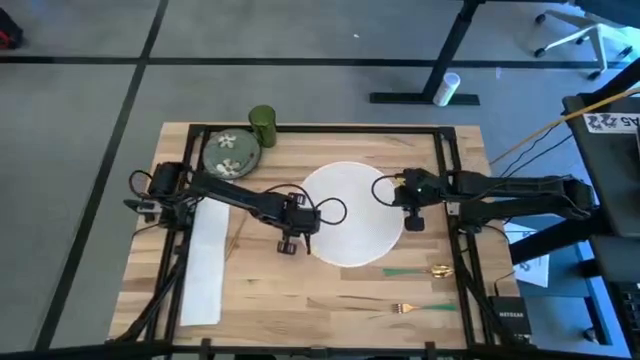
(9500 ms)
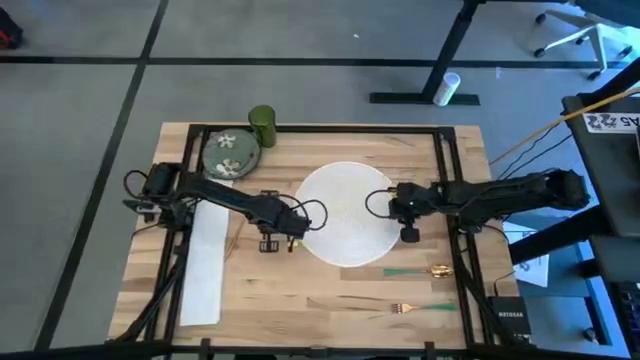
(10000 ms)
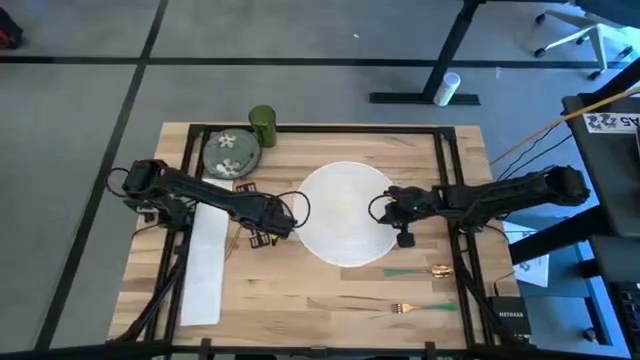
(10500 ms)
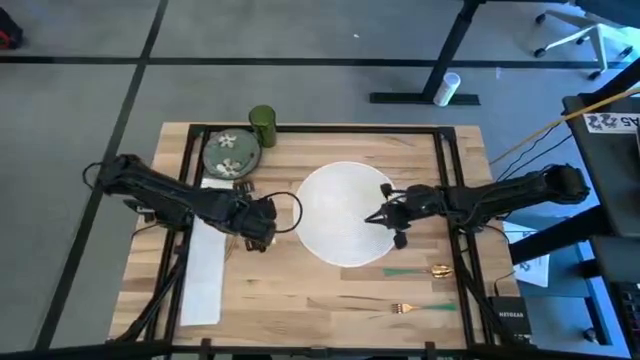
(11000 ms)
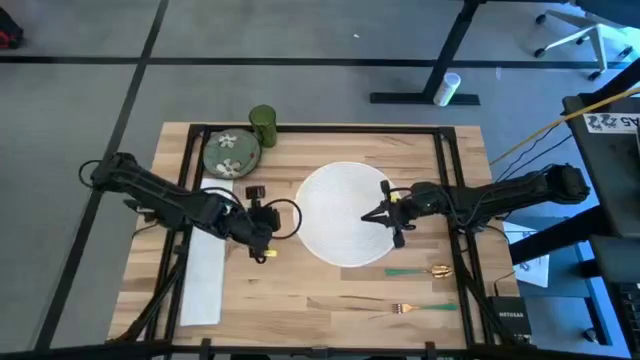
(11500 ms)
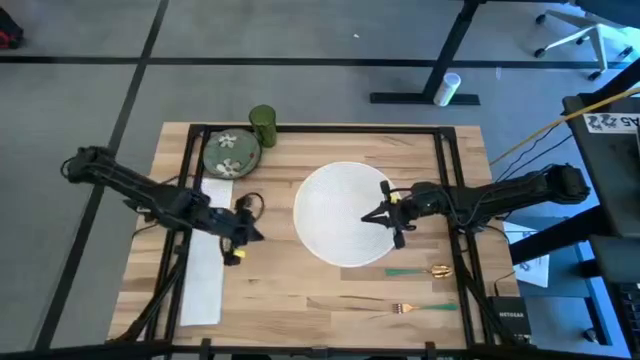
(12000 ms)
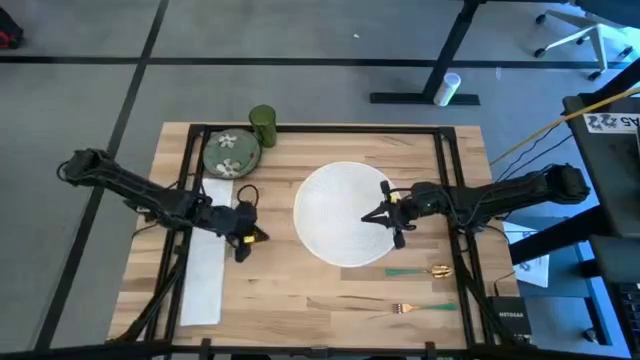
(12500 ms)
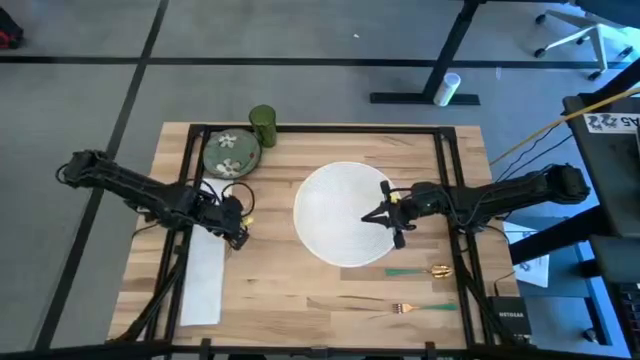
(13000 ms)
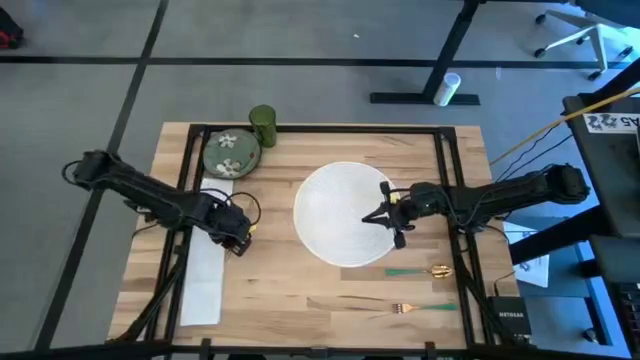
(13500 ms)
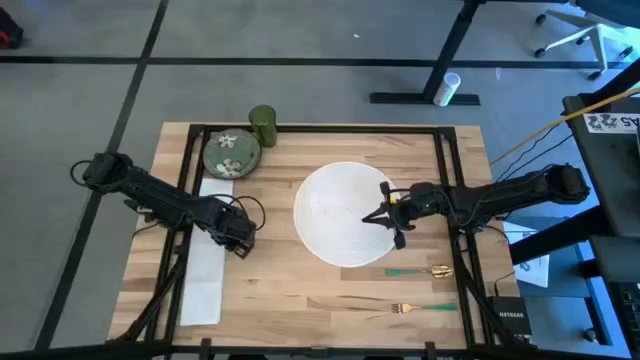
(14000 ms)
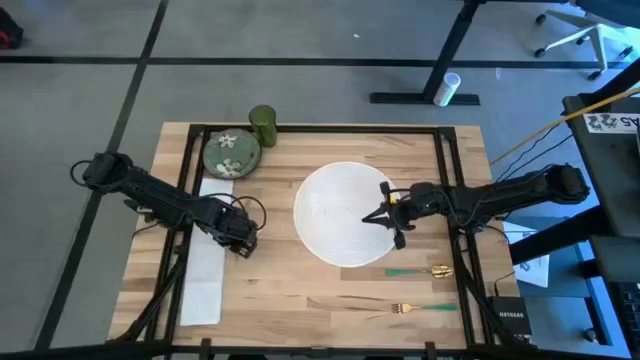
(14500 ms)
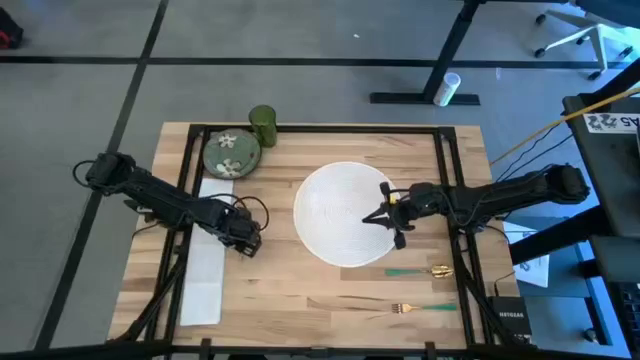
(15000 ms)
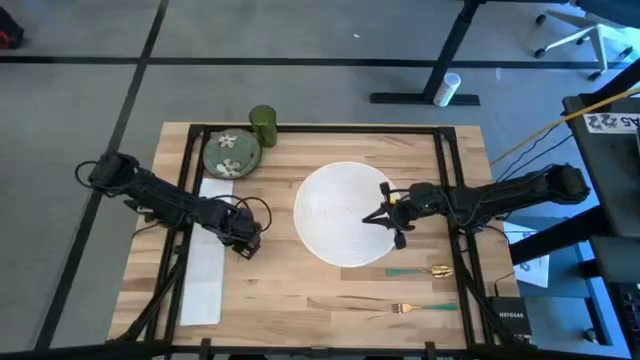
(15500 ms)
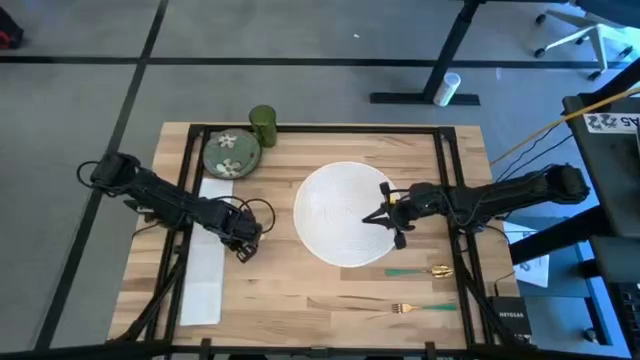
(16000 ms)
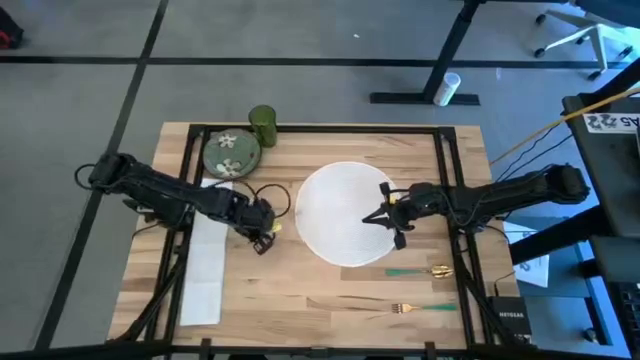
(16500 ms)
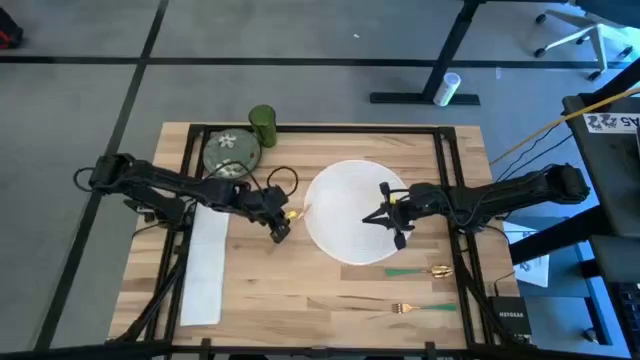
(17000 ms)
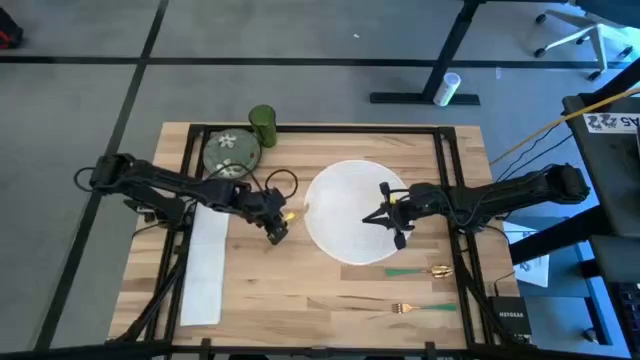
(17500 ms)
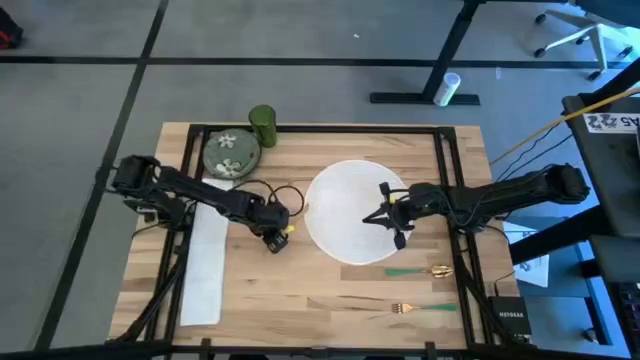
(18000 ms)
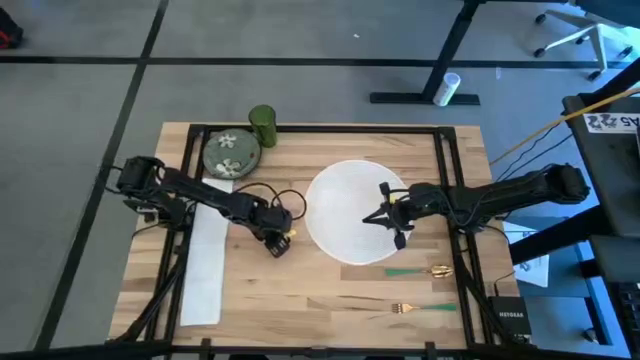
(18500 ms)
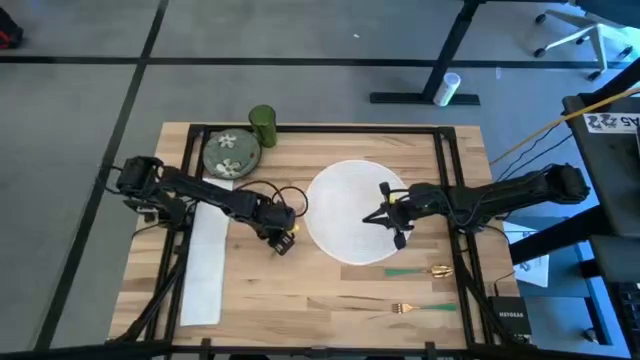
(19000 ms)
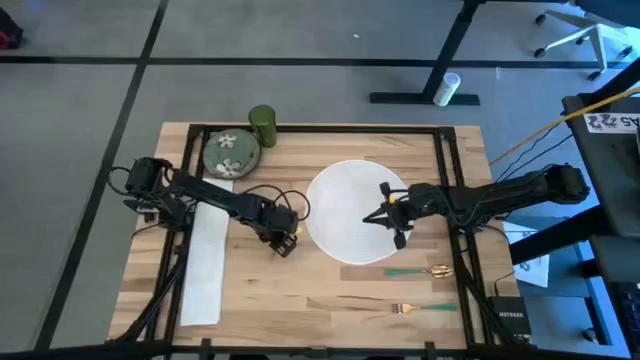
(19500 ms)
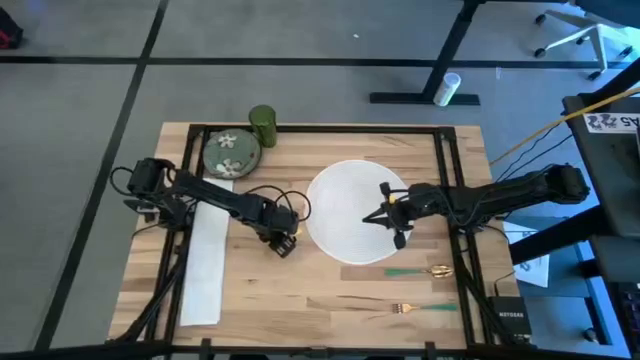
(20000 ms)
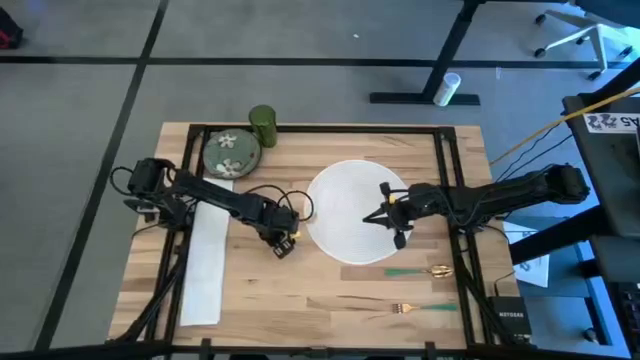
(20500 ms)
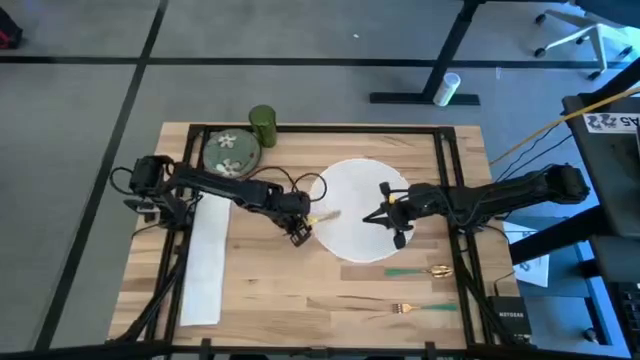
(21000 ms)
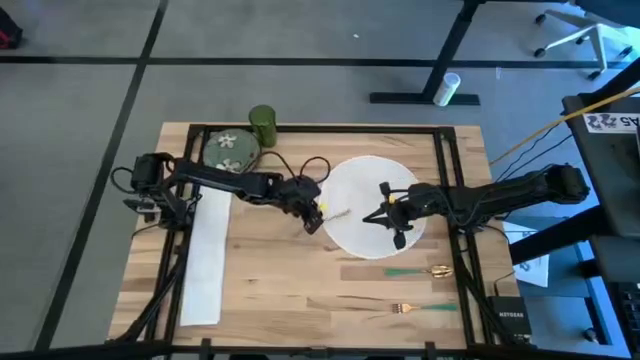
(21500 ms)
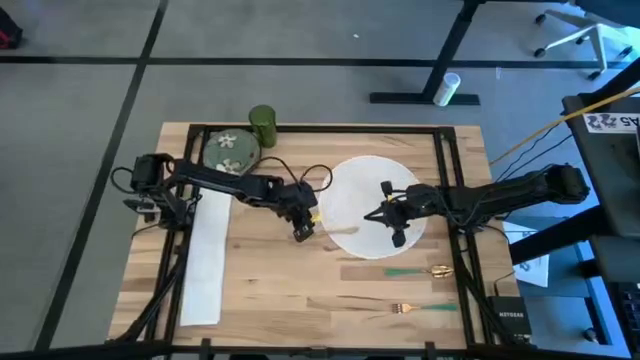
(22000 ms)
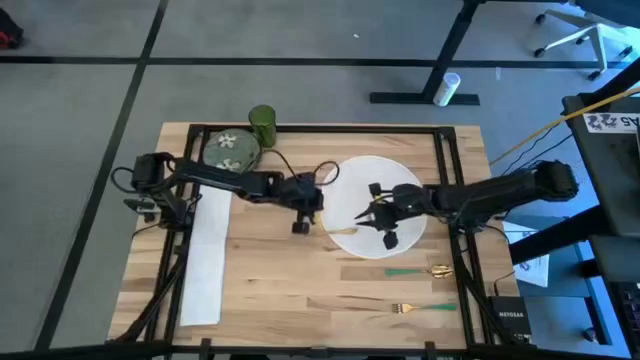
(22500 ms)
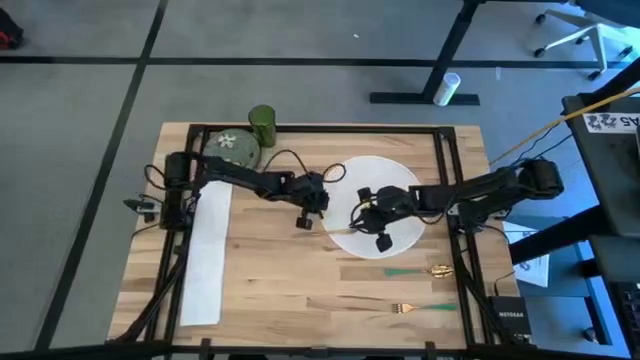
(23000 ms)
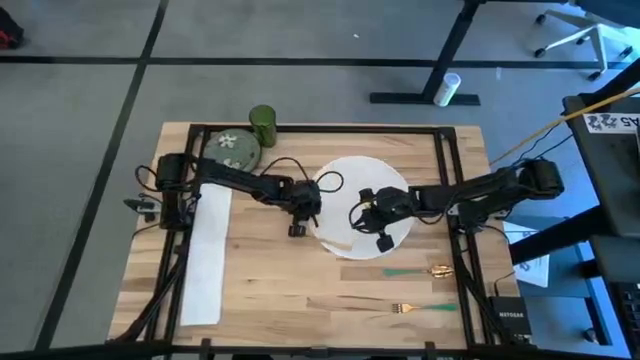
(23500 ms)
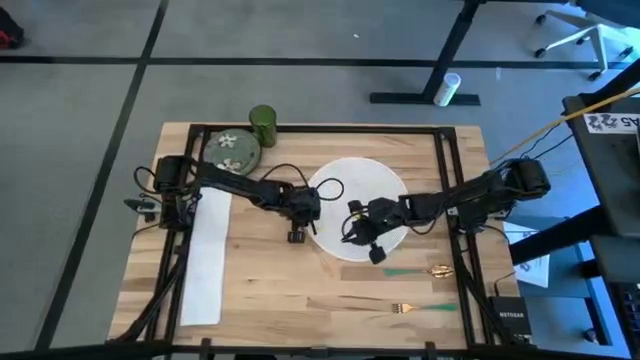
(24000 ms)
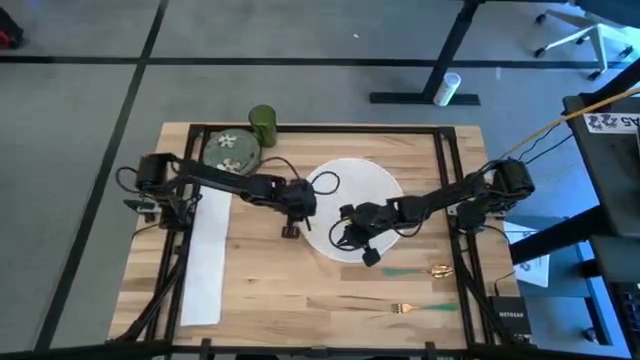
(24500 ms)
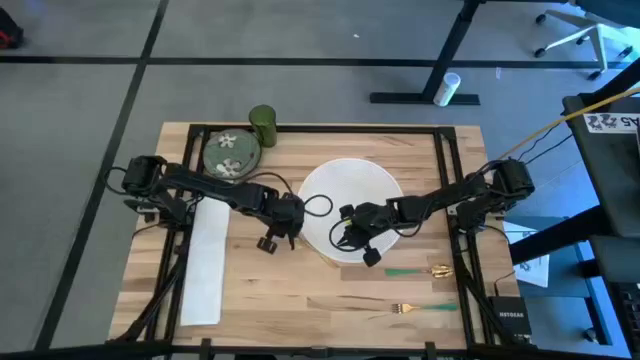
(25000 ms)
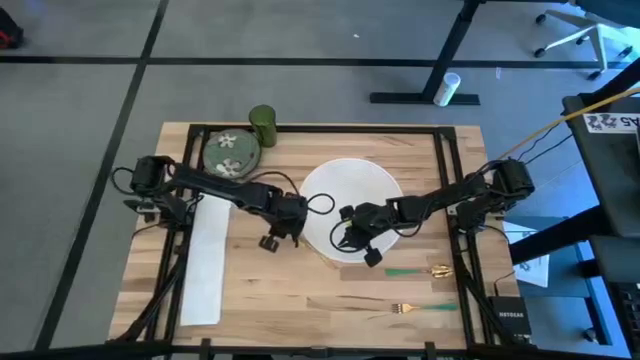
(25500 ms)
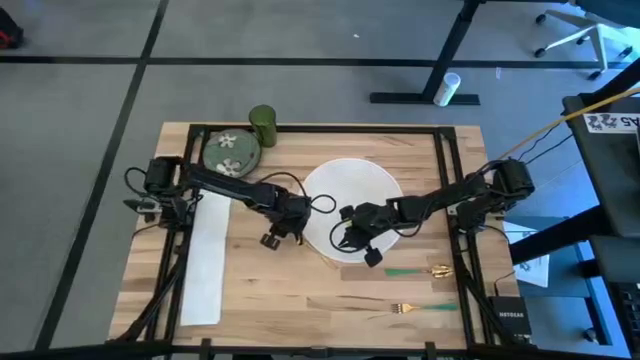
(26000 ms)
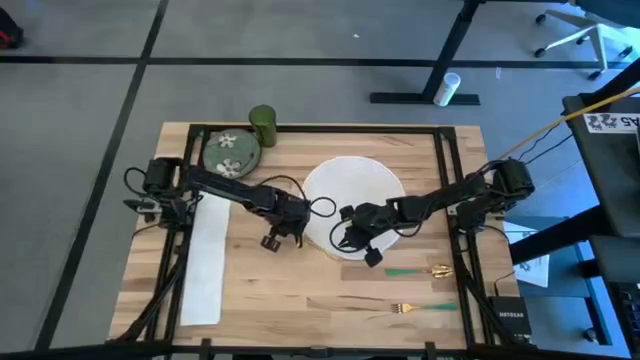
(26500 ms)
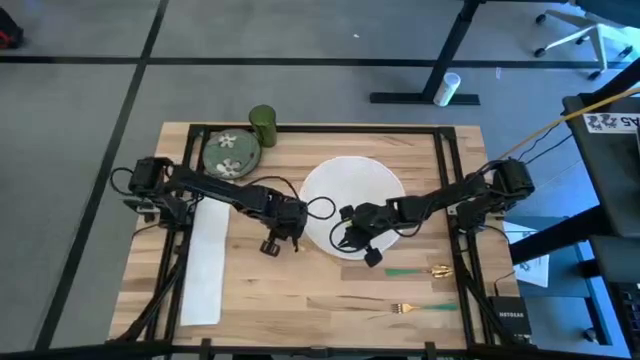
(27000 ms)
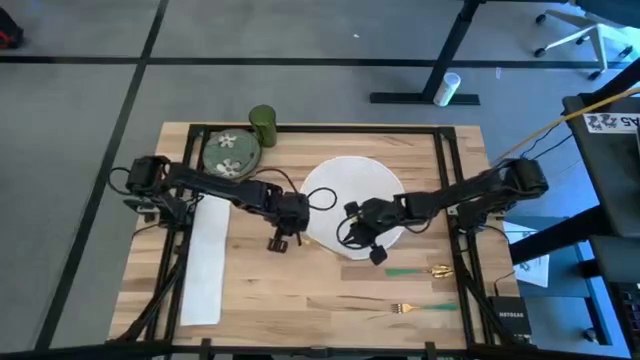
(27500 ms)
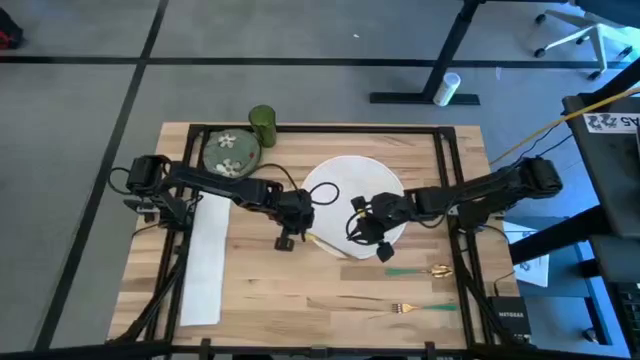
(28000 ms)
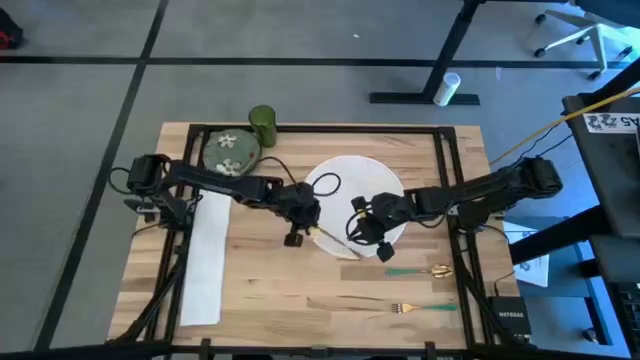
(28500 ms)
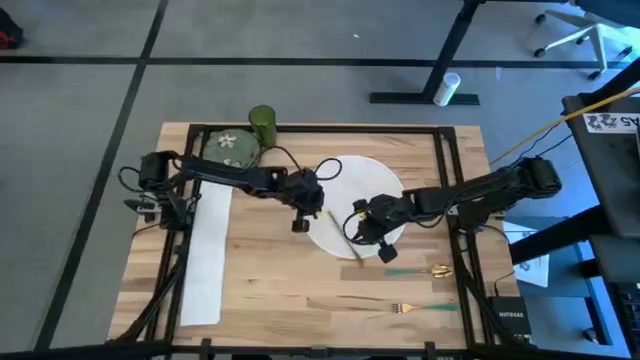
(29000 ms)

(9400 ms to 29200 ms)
Task: Set table place
Put the gold table knife on the white table mat

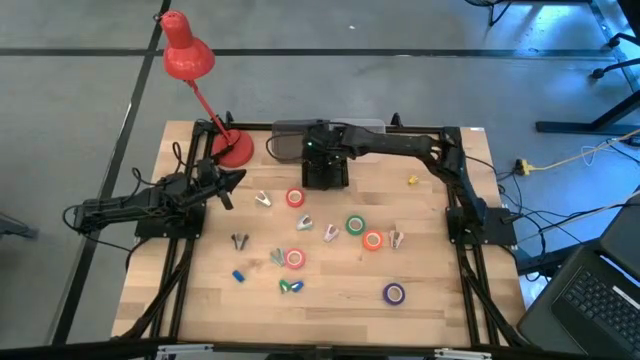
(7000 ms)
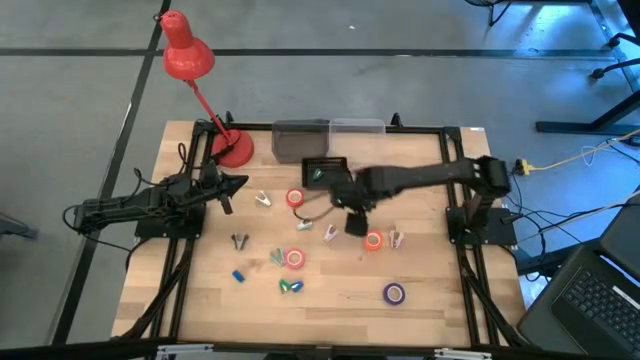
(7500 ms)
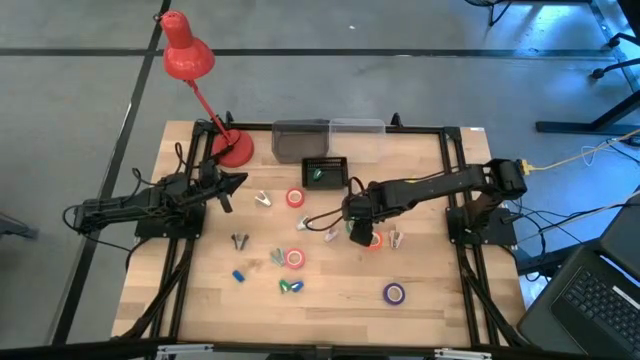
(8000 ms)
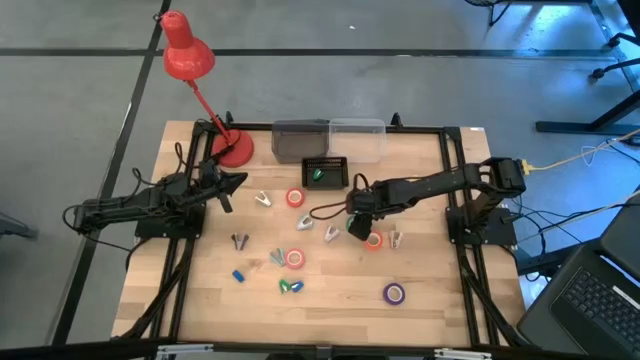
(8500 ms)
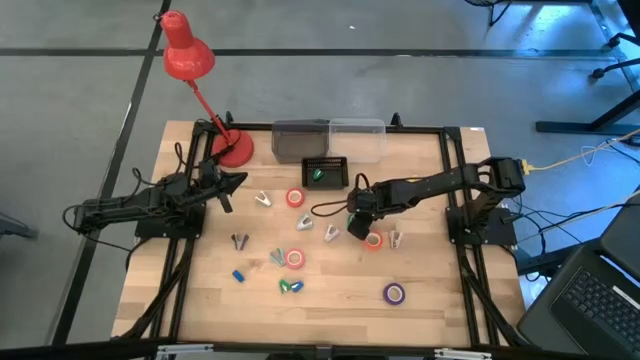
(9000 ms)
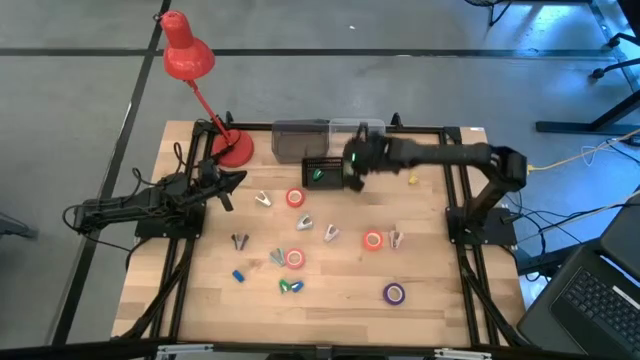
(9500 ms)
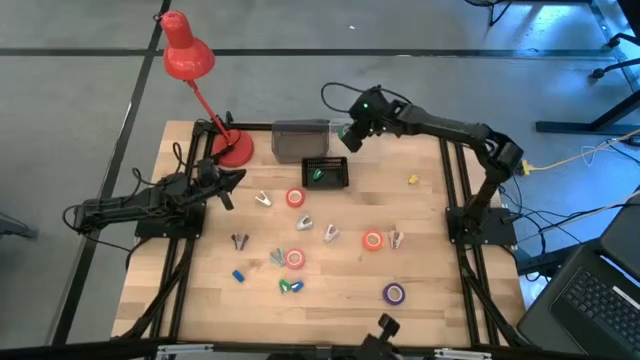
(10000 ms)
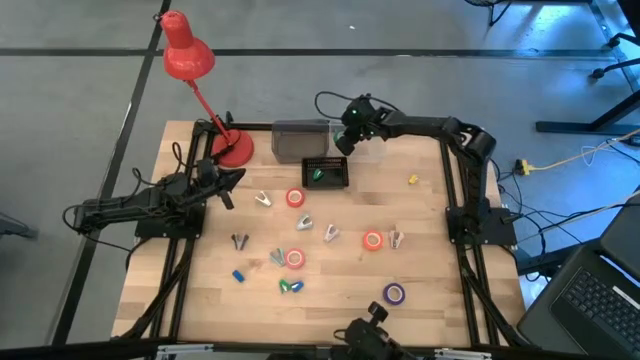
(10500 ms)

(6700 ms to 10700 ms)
Task: Pick and place Stapler, Stapler remover, tape
Put the green tape into the transparent bin
